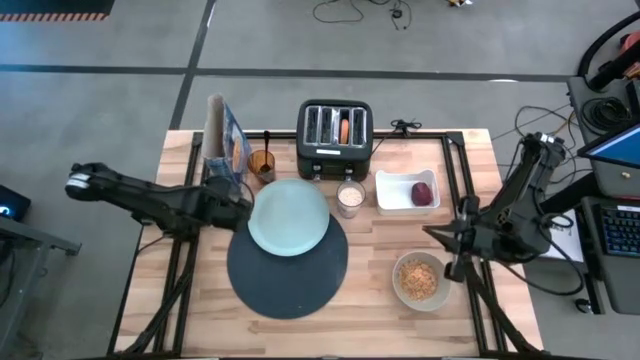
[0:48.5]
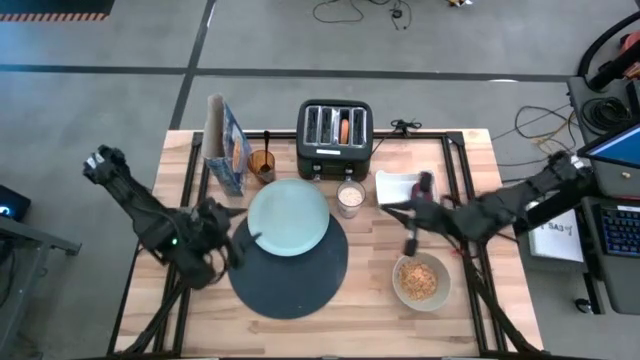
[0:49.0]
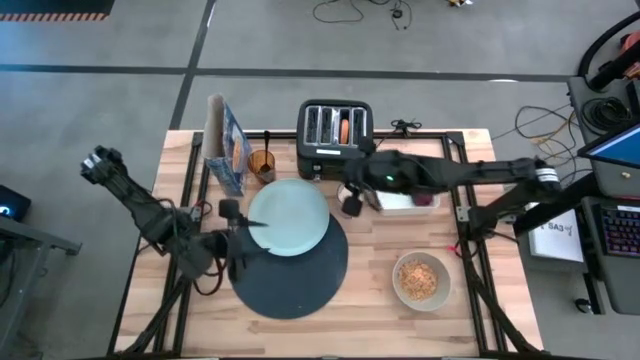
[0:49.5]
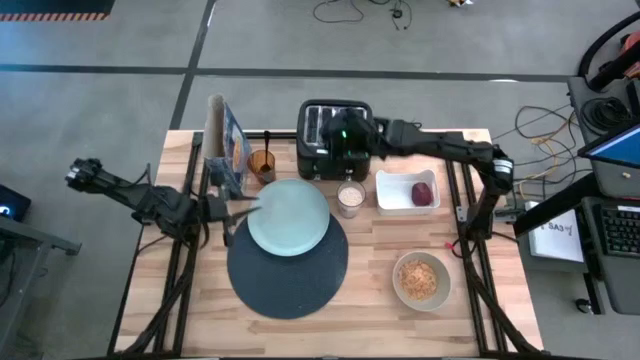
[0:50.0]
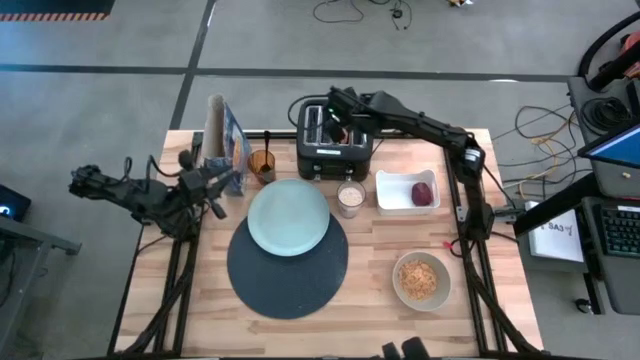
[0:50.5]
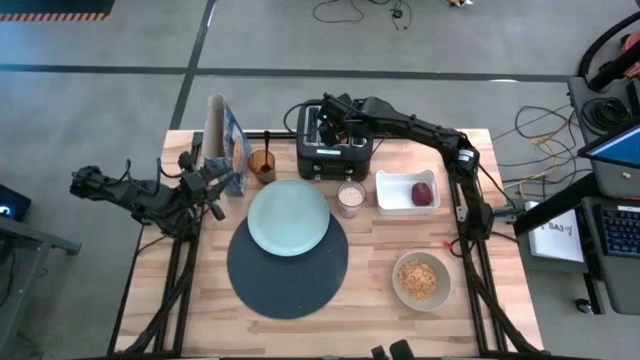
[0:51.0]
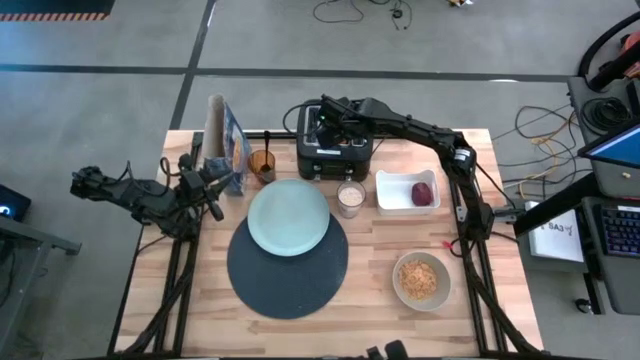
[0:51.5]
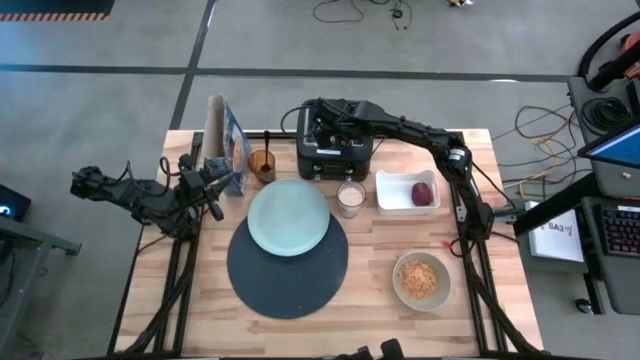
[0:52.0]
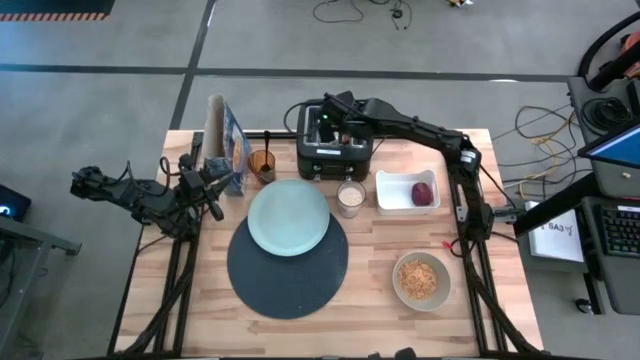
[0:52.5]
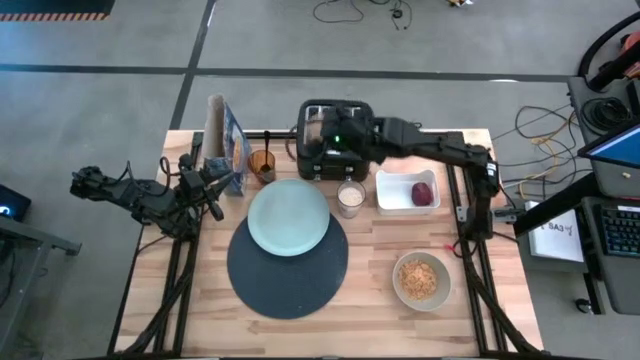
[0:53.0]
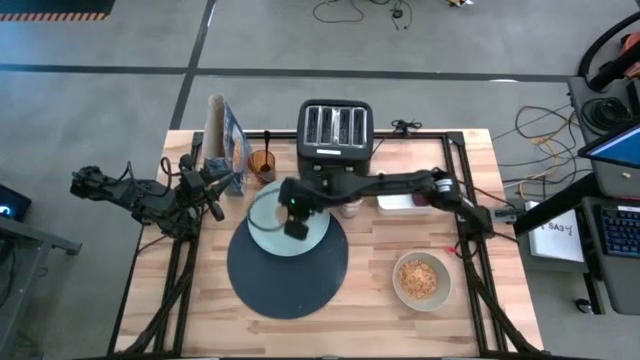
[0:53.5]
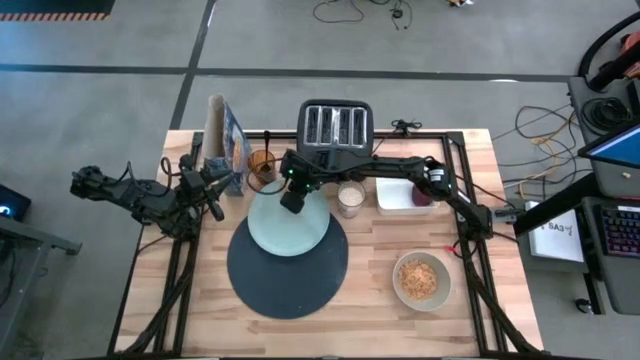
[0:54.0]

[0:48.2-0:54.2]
Task: Arrange a breakfast setting
Put the toasted bagel on the blue plate

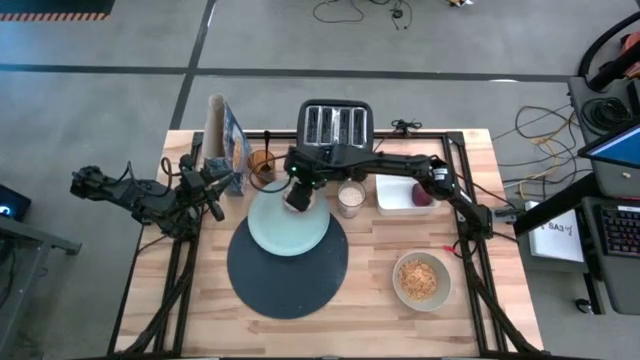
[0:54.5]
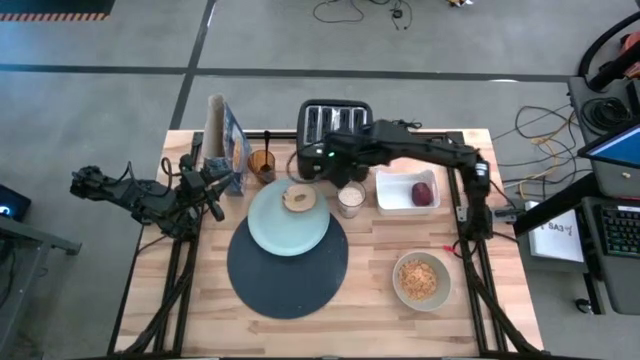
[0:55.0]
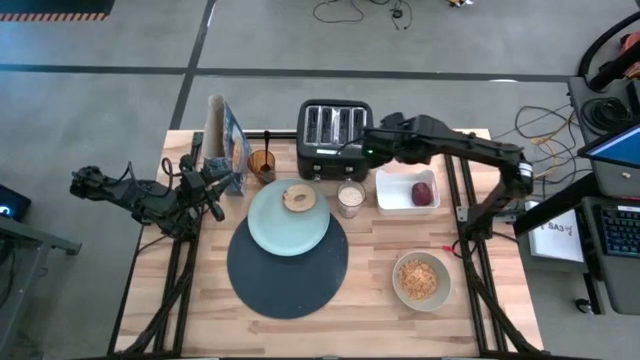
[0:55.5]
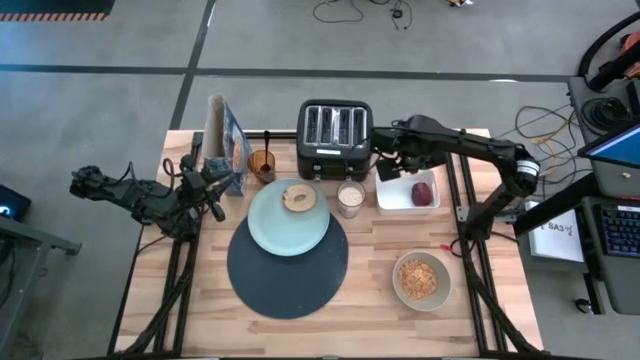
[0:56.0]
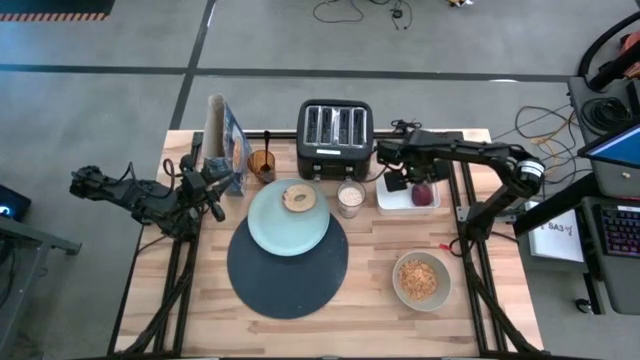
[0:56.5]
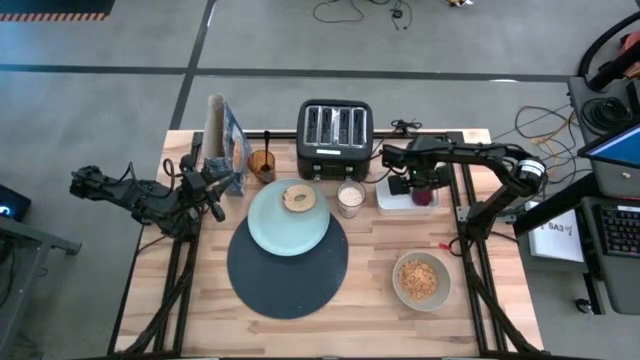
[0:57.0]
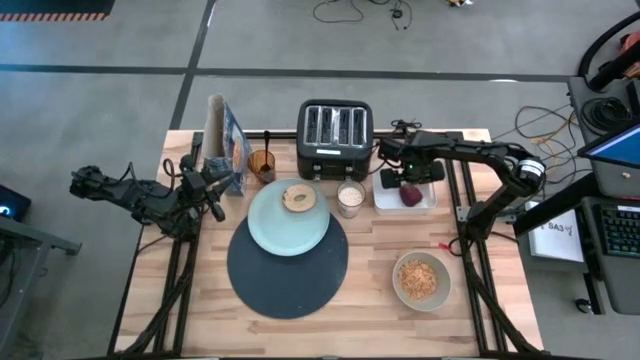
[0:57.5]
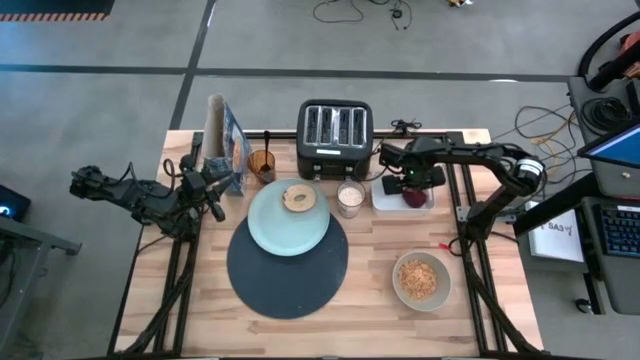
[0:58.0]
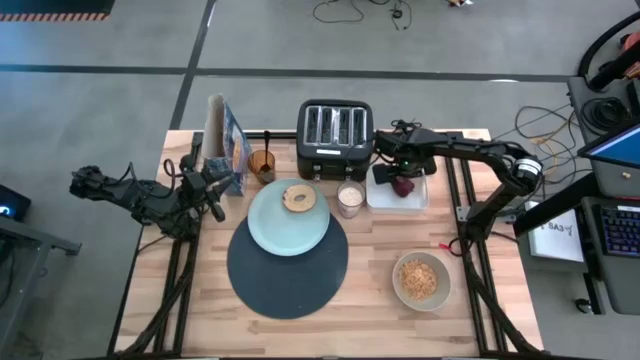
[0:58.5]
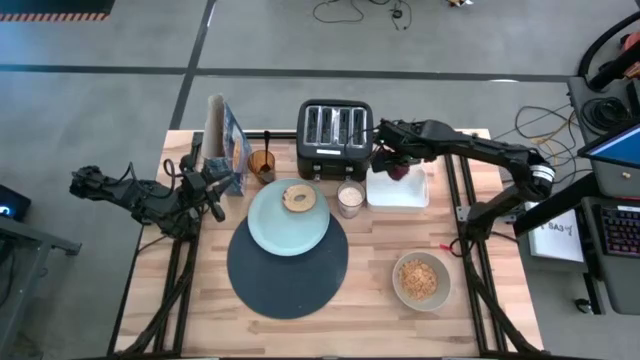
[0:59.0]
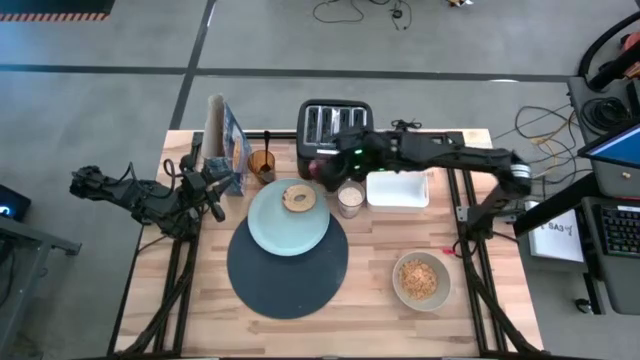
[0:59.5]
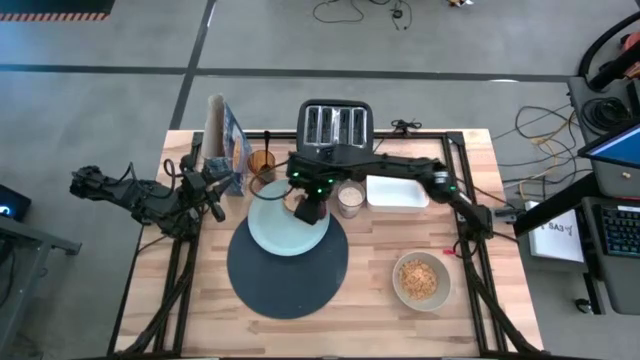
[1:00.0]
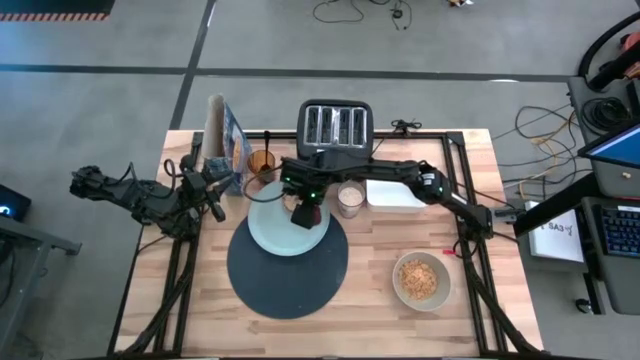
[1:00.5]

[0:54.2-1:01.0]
Put the apple on the blue plate

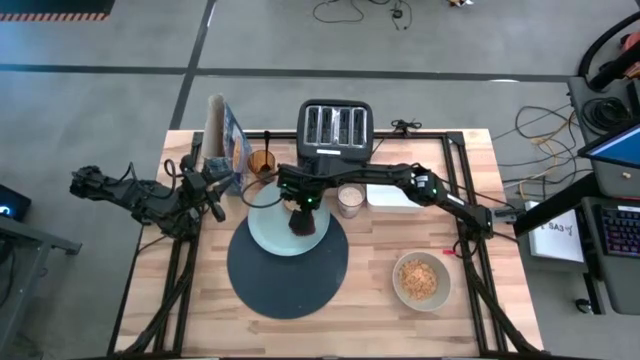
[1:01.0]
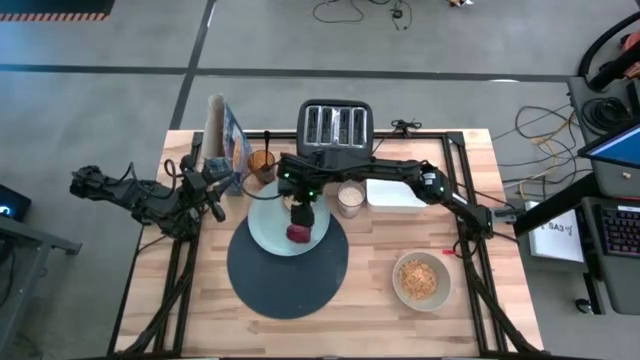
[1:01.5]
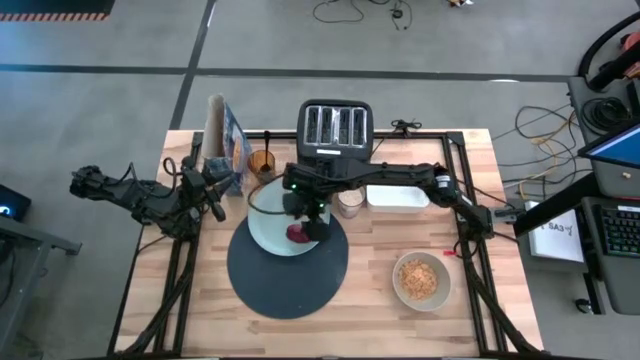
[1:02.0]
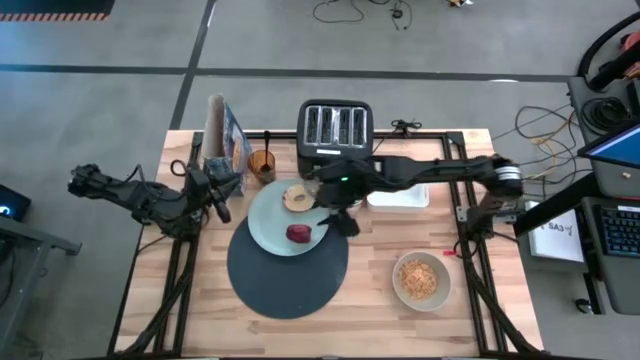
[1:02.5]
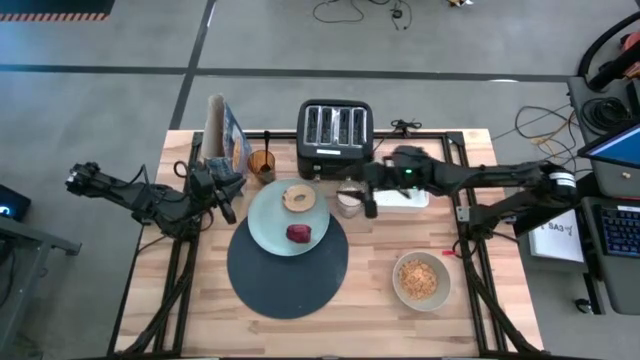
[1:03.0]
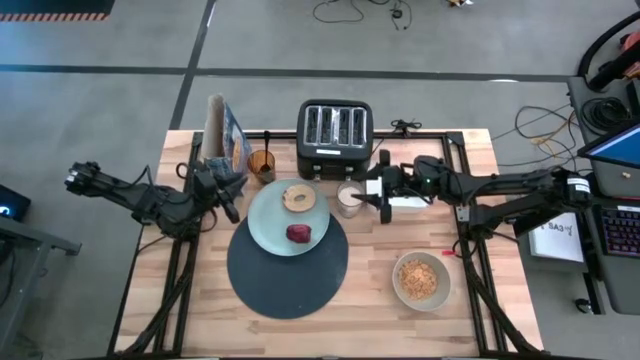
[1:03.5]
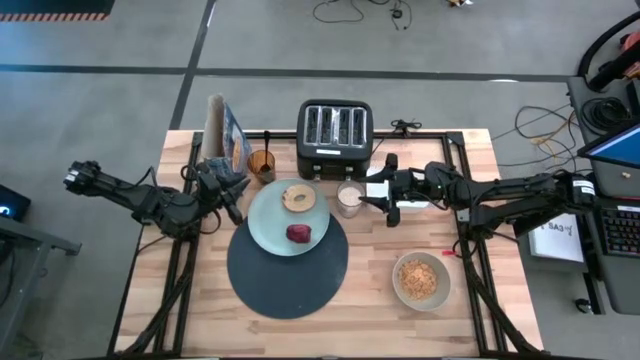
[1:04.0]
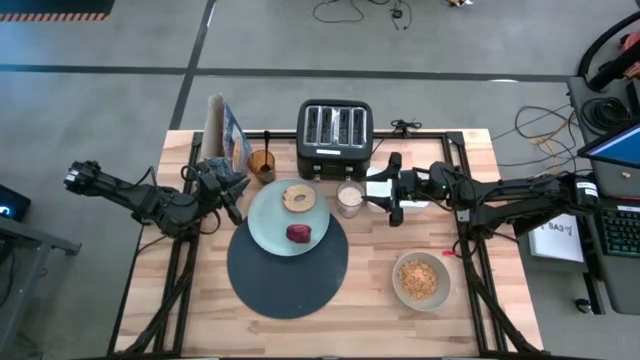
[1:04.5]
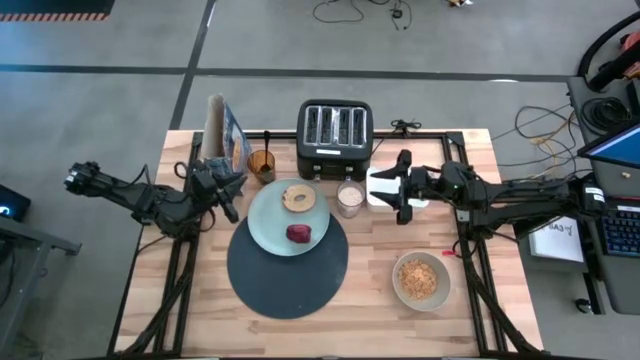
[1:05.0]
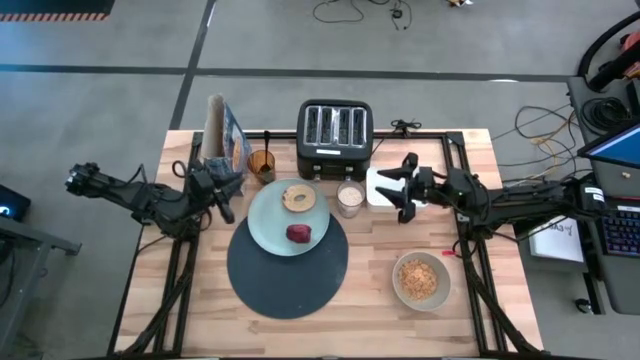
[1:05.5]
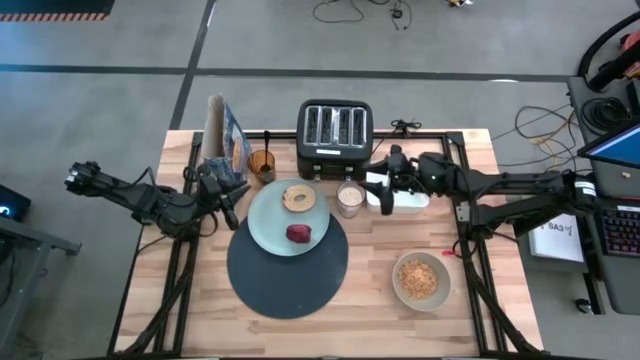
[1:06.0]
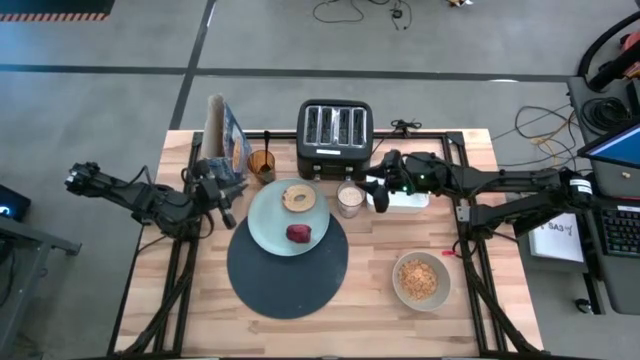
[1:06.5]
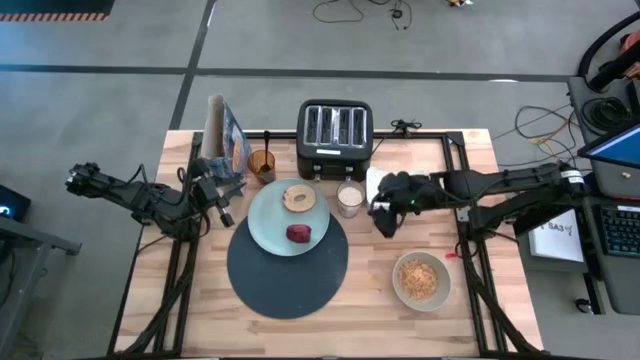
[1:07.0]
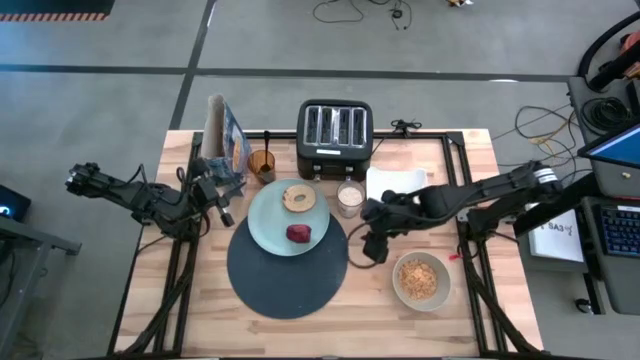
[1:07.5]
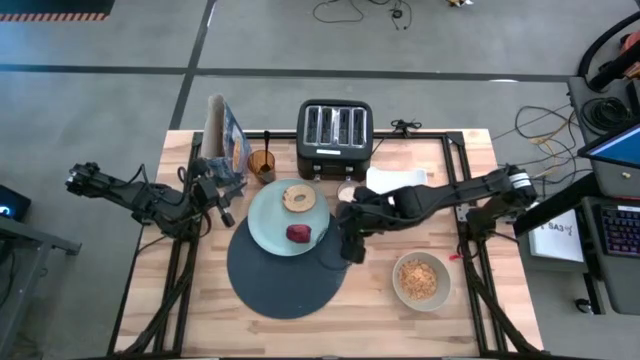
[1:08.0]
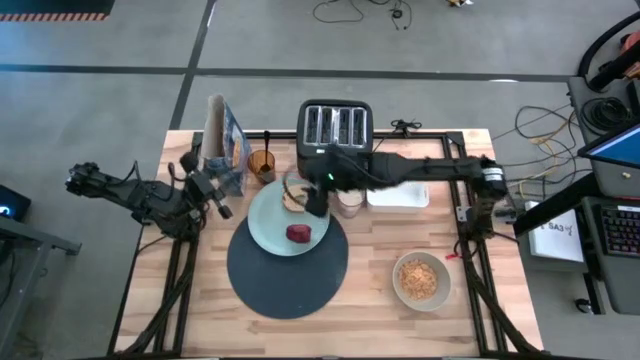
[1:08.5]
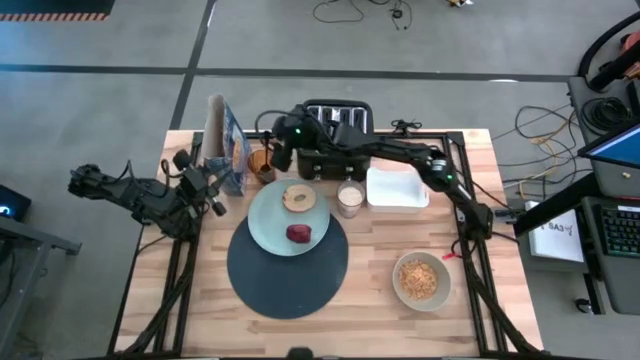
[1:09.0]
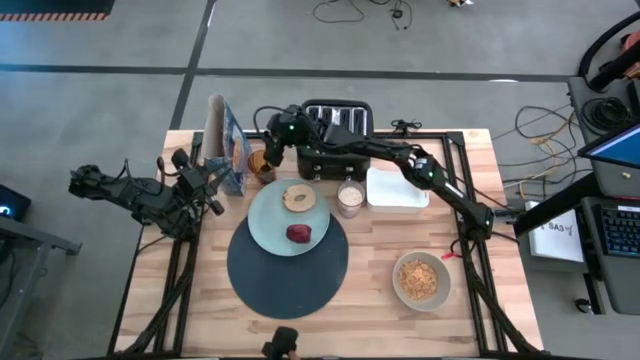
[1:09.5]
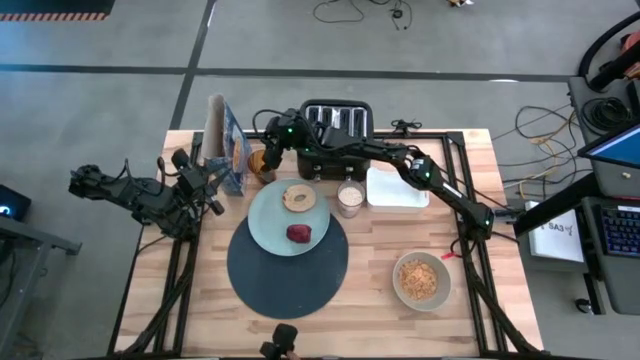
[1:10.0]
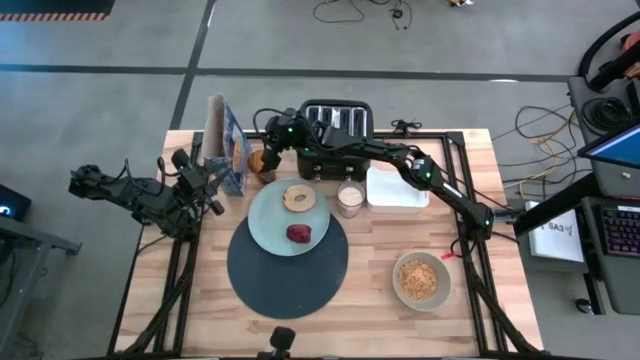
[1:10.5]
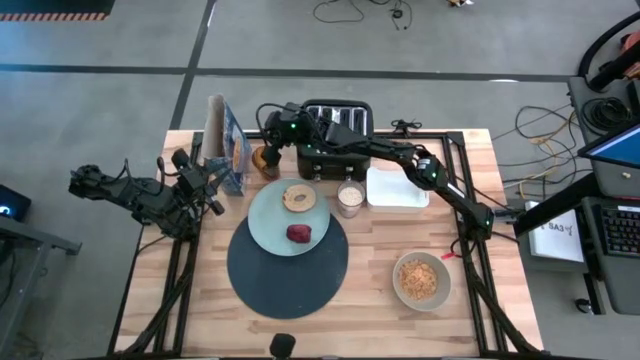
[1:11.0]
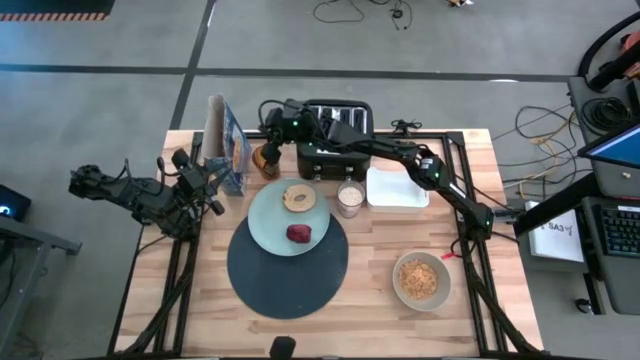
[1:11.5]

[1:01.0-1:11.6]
Put the spoon on the table mat
